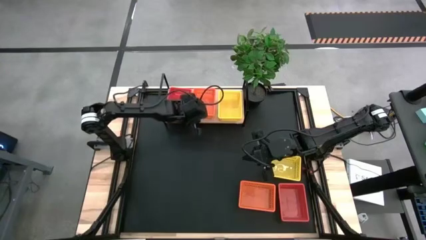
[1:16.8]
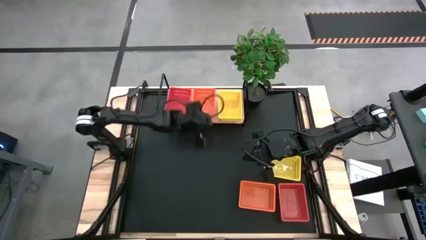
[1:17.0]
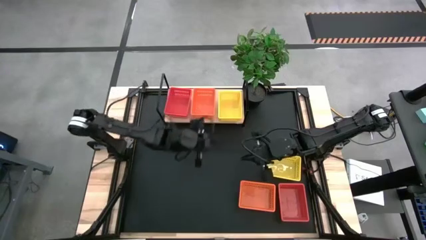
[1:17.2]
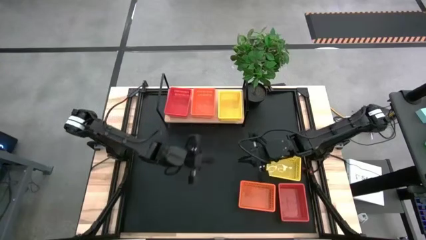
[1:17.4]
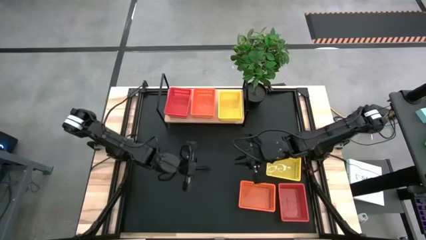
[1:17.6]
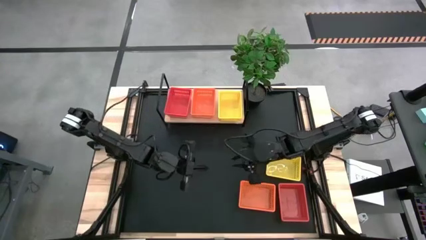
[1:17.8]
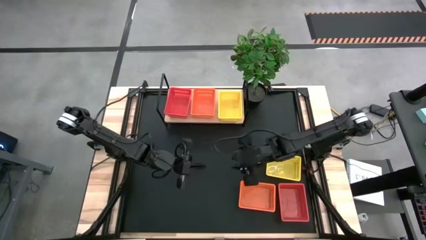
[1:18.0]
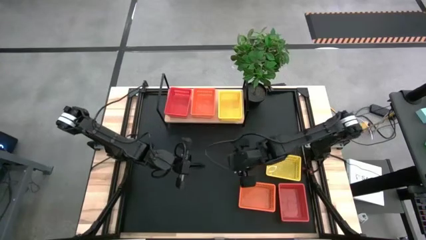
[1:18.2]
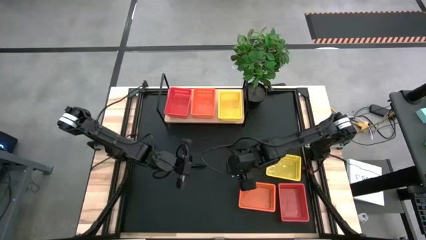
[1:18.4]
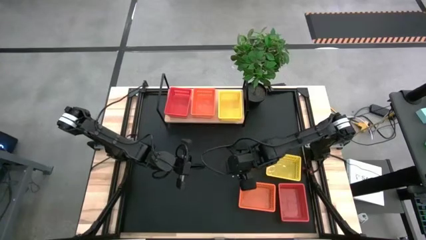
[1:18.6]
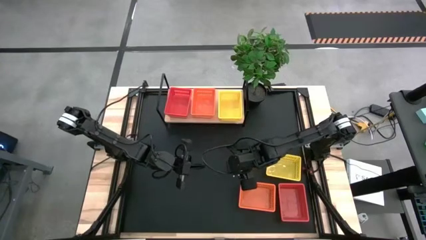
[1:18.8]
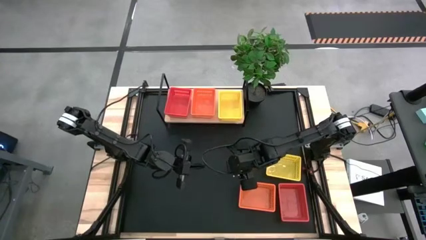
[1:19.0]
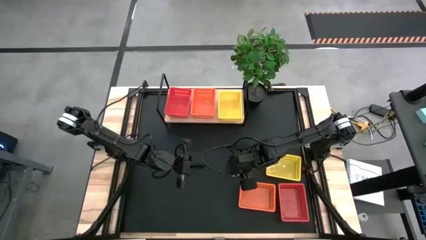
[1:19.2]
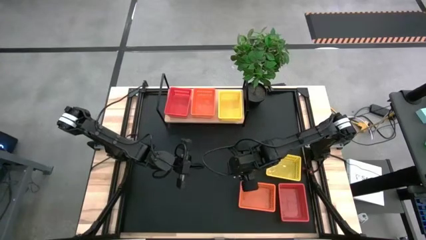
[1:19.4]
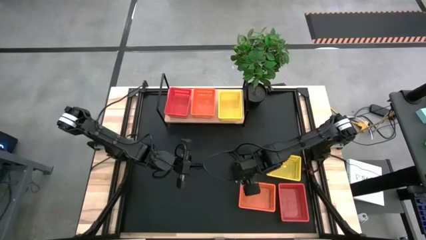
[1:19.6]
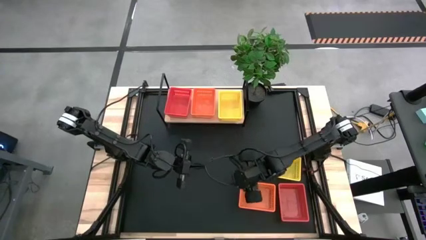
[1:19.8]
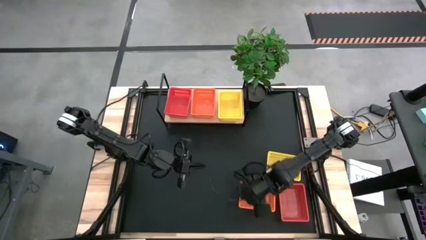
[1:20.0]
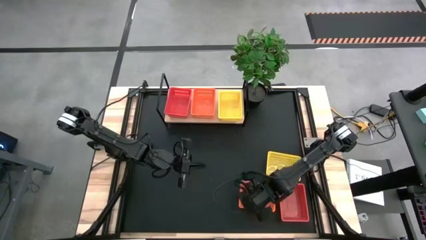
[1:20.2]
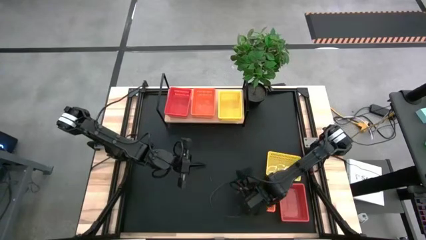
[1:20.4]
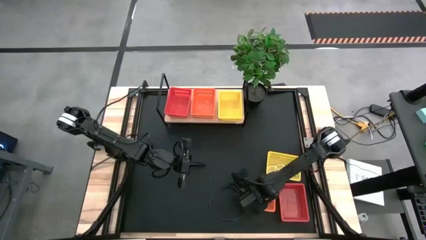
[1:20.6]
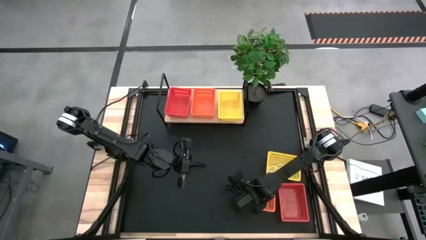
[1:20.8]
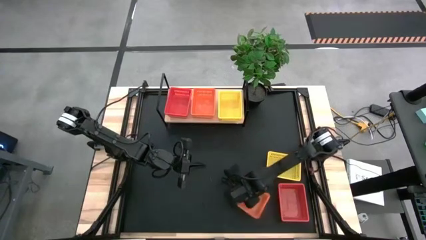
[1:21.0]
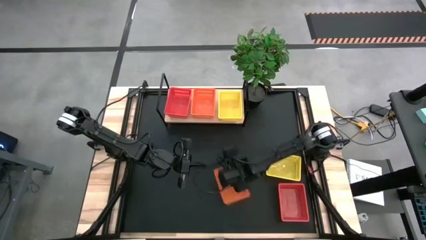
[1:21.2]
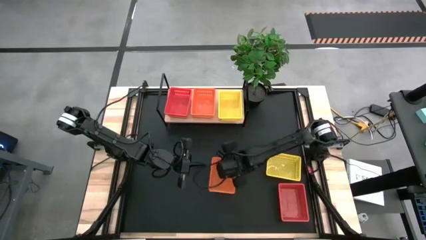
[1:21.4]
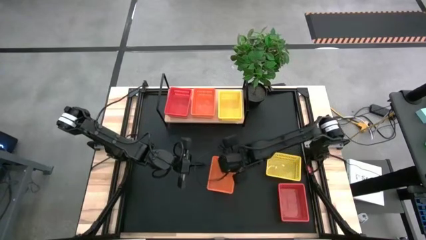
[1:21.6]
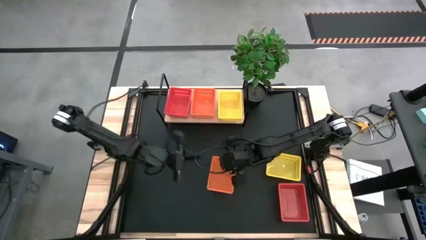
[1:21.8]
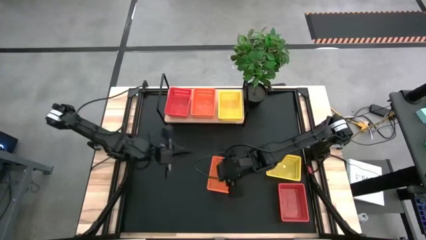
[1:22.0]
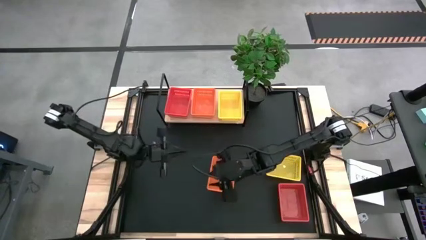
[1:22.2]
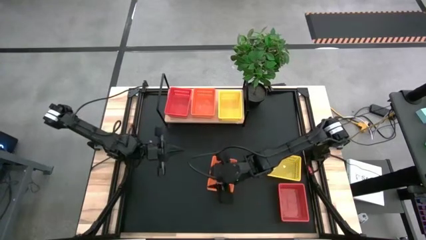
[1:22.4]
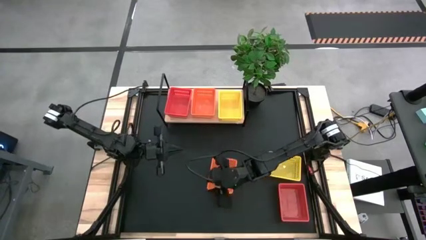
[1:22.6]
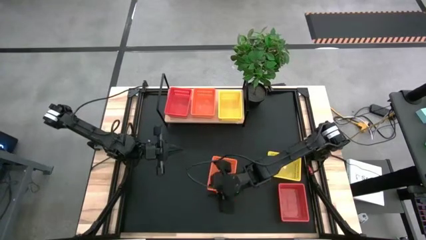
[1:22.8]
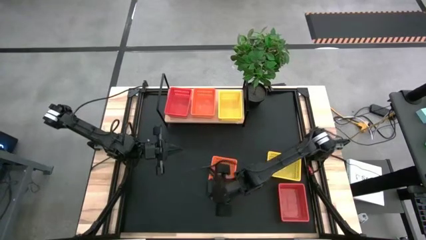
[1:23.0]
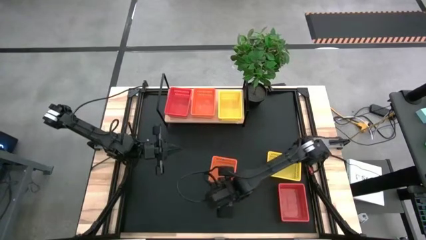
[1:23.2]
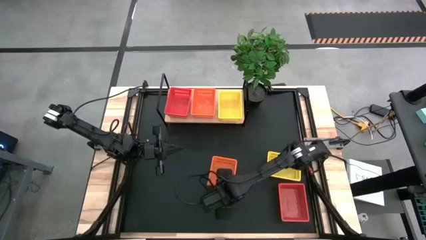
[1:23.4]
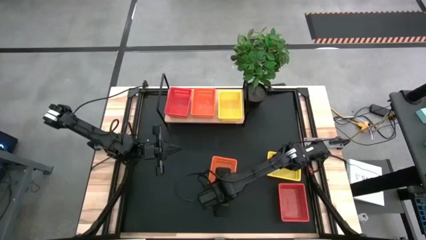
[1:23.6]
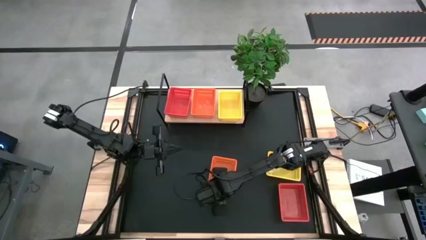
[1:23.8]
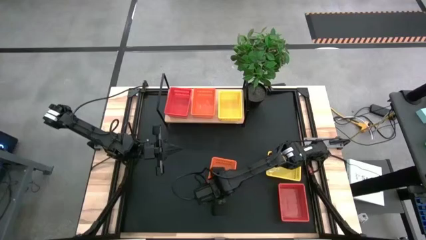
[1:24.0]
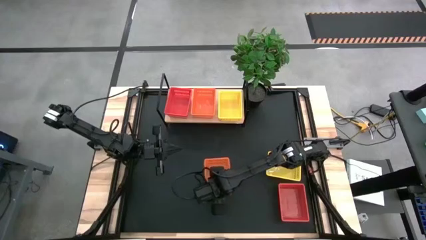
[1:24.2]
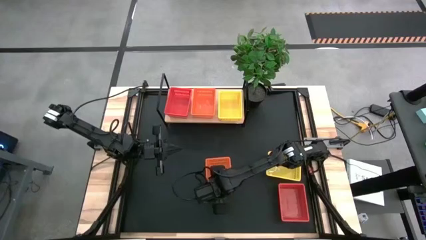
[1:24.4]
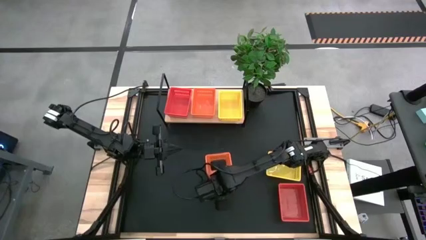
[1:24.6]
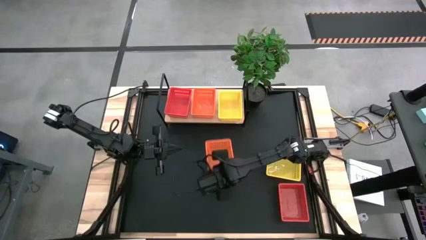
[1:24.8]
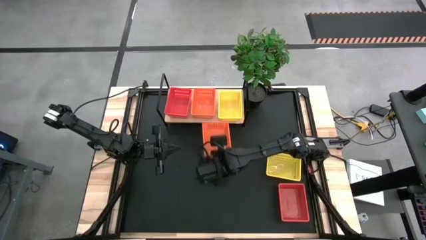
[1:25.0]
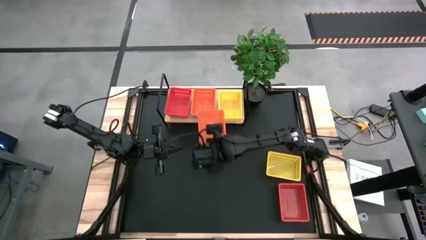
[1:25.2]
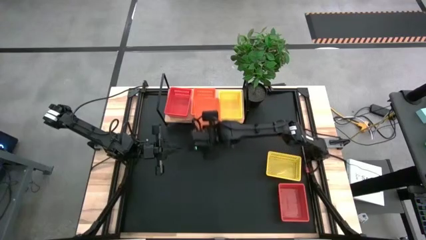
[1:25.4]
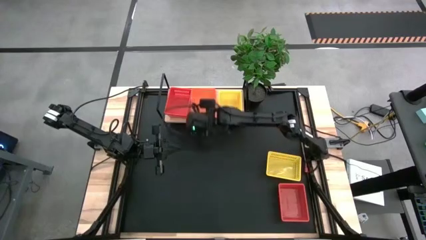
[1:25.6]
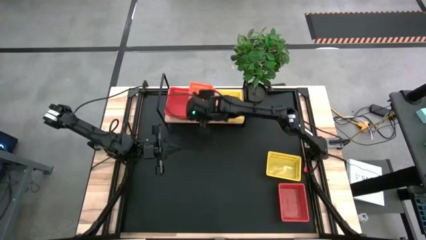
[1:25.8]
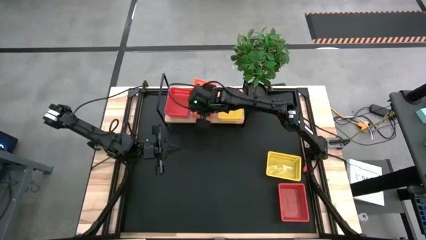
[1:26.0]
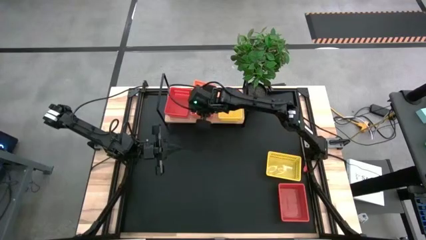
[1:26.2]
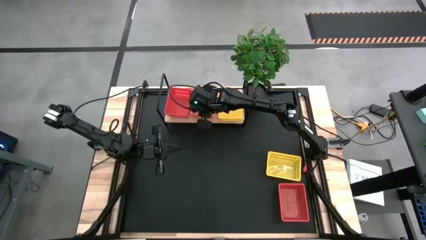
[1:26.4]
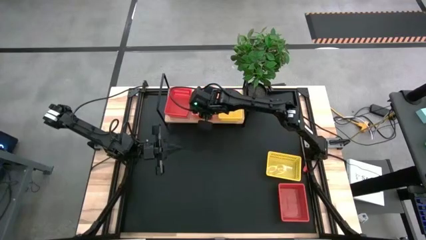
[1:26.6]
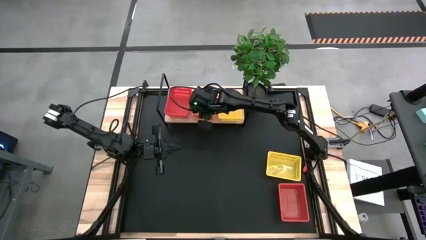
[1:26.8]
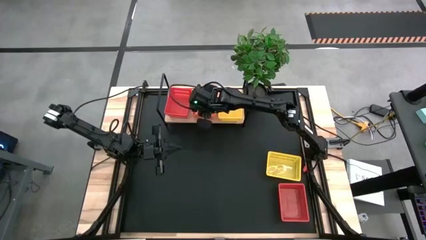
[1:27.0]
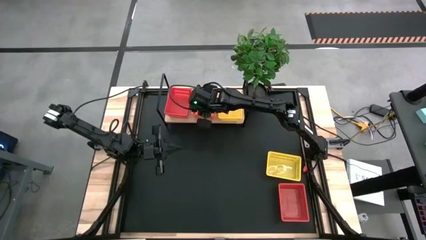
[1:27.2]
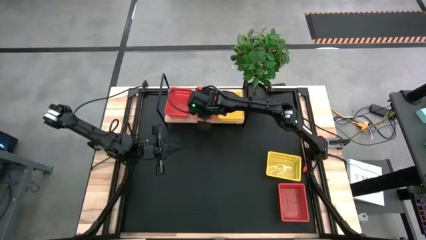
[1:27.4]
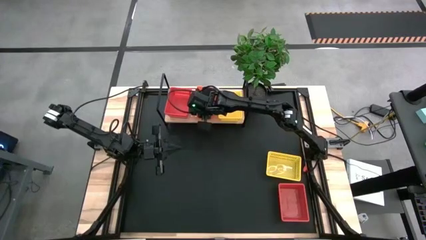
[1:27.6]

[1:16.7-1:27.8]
Task: Stack baskets on shelf by color
Stack the orange bin on top of the orange bins on the shelf

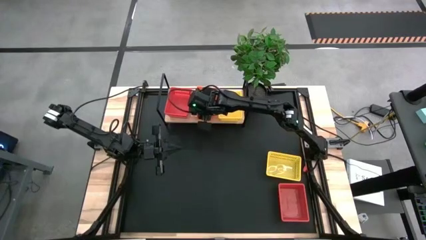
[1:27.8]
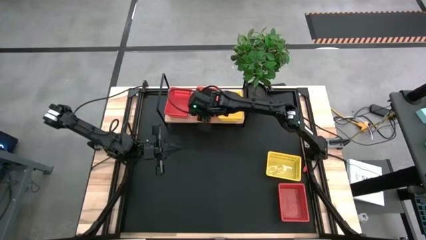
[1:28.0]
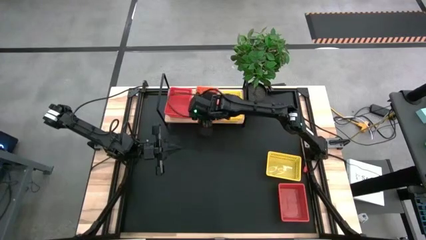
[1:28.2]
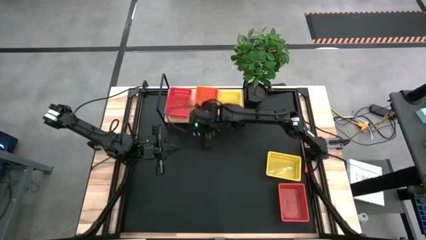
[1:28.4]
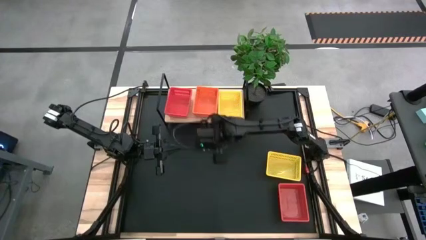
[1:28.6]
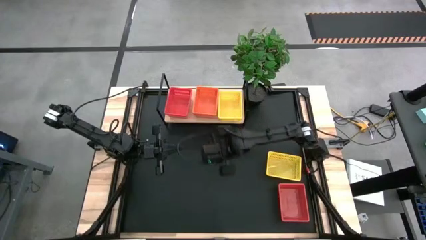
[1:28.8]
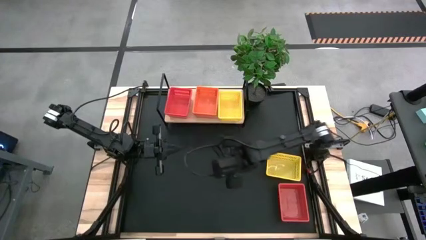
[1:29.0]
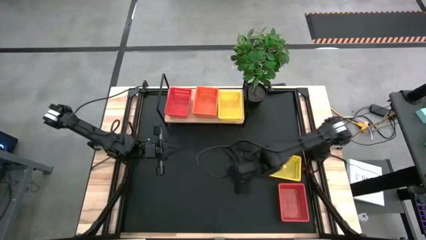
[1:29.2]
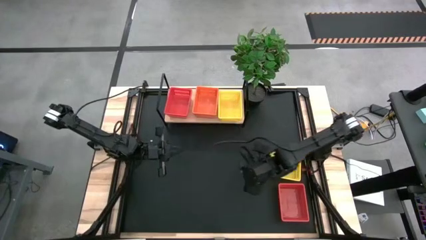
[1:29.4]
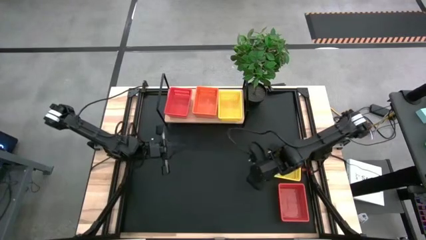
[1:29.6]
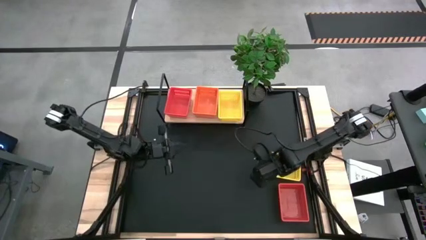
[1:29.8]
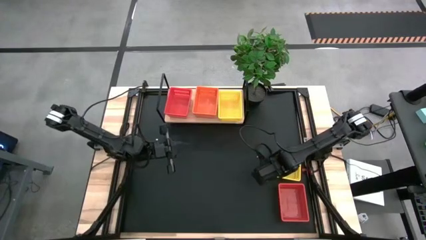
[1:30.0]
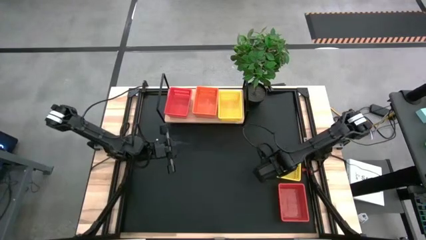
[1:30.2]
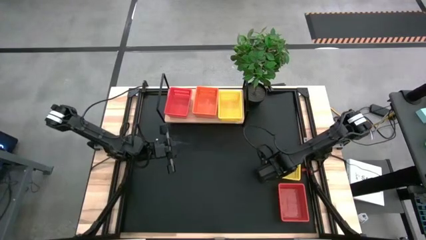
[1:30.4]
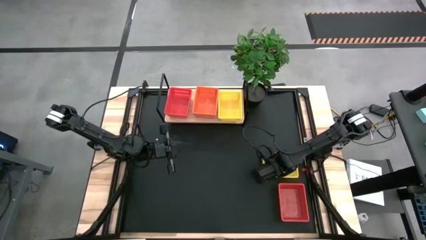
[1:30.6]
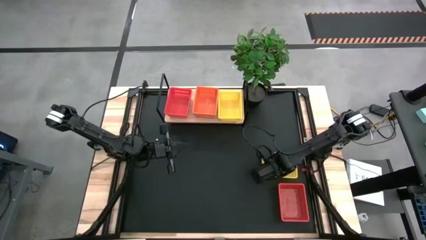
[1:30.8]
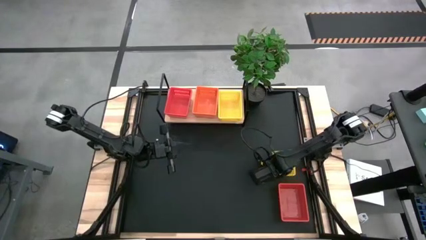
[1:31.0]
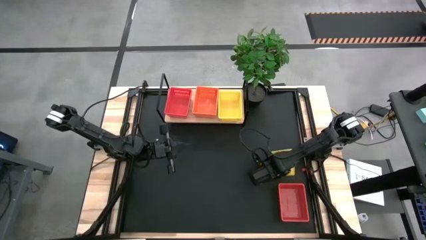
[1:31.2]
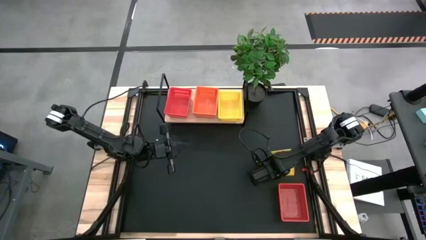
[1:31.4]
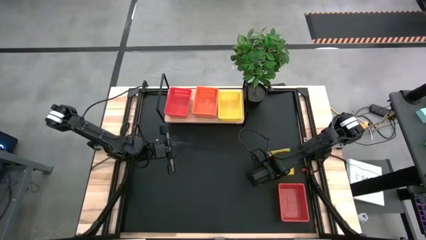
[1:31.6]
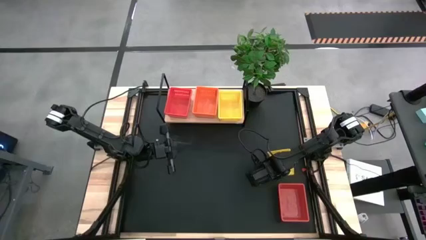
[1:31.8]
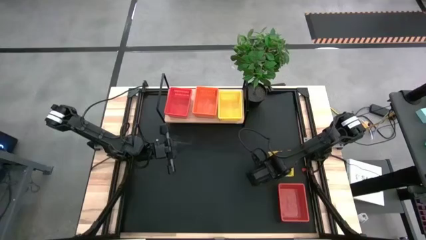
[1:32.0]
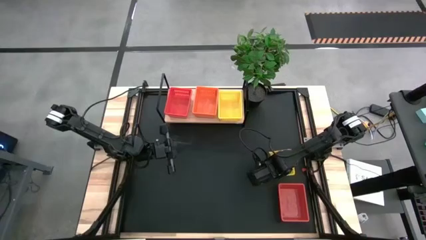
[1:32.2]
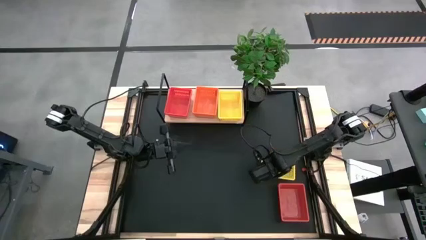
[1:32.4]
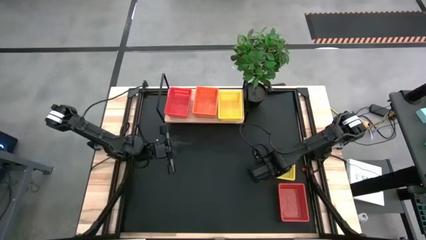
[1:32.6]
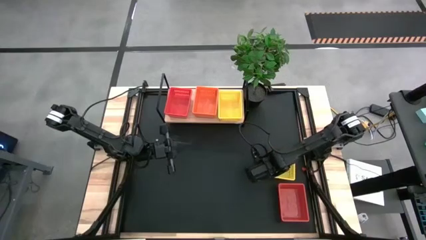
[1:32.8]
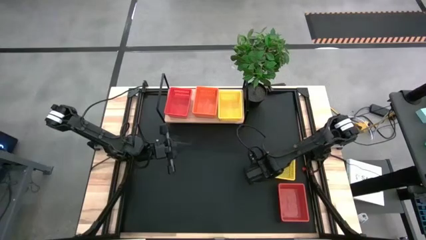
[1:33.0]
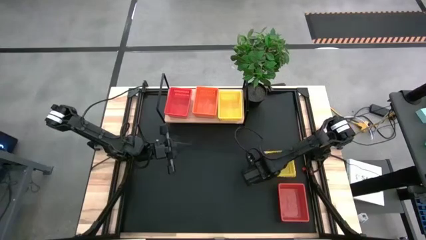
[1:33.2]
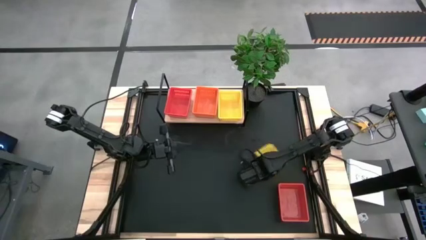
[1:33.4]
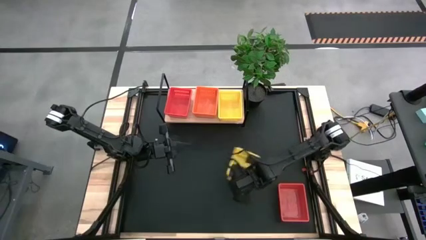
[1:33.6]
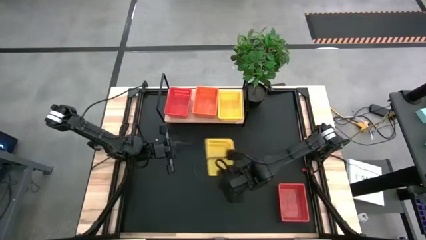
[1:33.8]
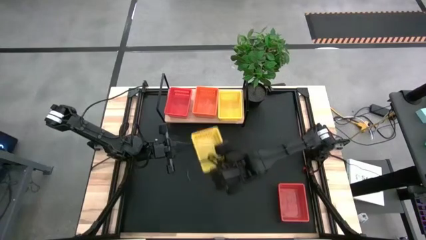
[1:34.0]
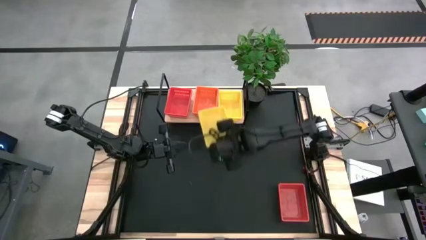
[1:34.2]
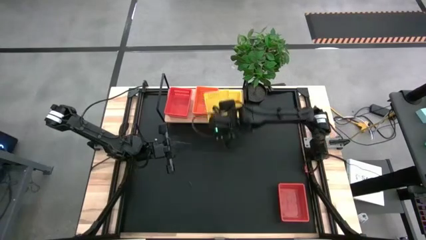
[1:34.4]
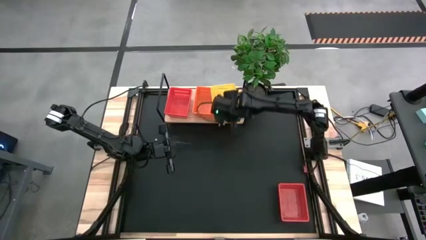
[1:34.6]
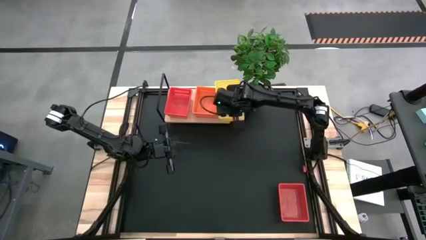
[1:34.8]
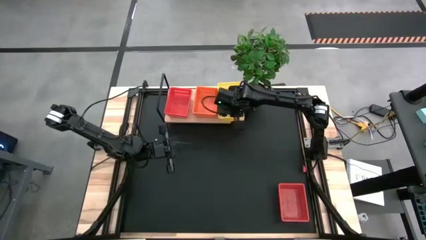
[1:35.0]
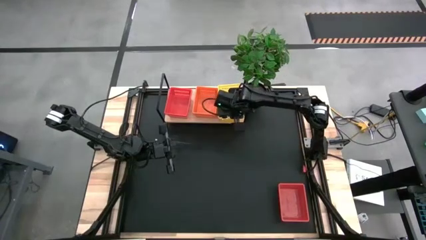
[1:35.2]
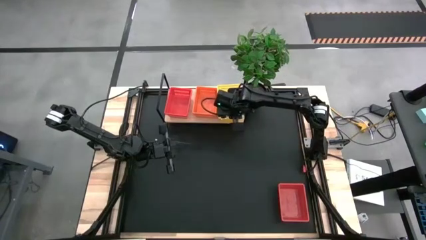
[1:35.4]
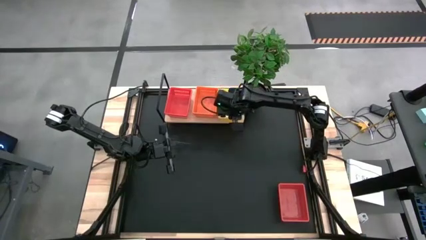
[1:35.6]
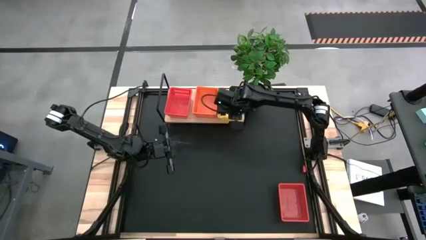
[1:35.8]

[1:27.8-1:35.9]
Stack the yellow bin on top of the yellow bins on the shelf
